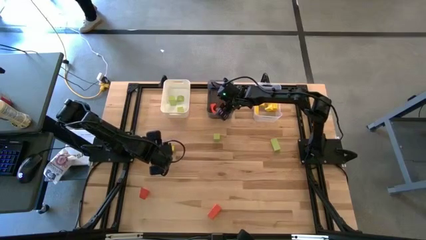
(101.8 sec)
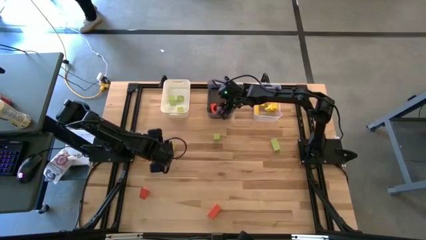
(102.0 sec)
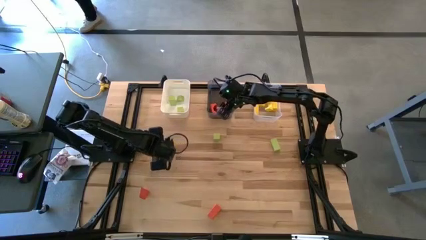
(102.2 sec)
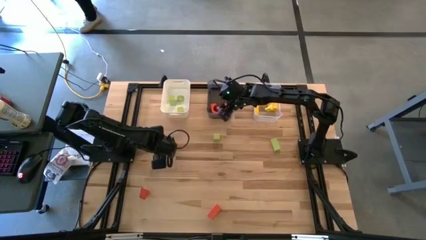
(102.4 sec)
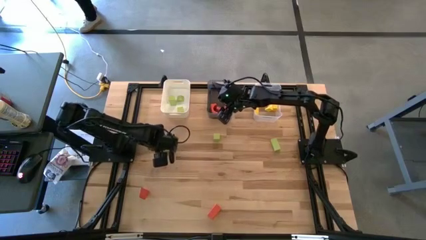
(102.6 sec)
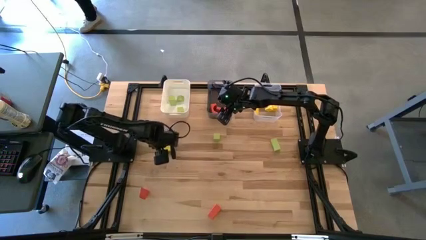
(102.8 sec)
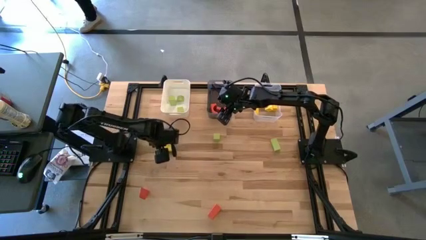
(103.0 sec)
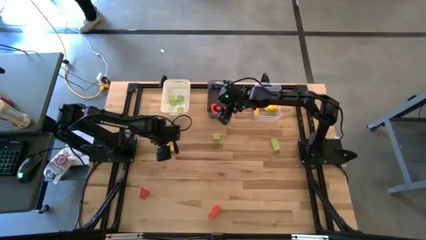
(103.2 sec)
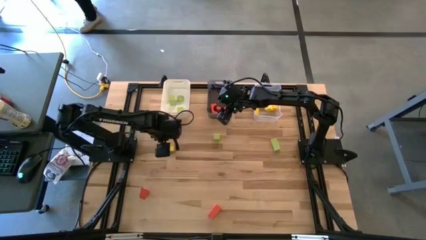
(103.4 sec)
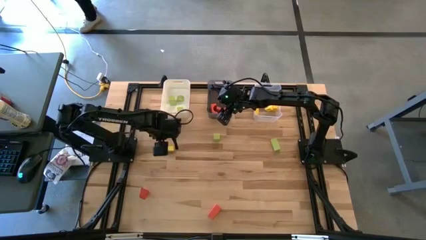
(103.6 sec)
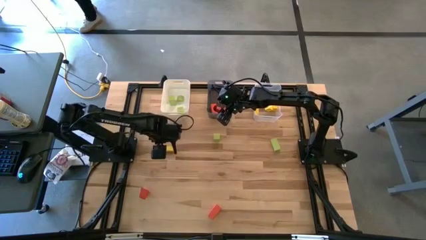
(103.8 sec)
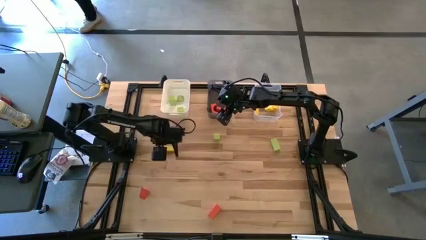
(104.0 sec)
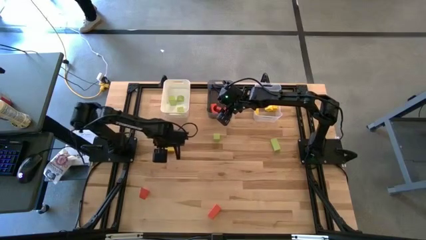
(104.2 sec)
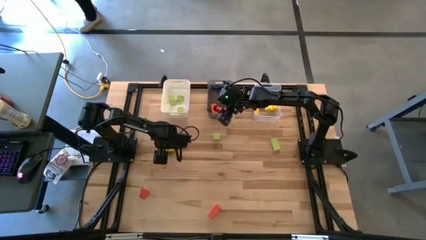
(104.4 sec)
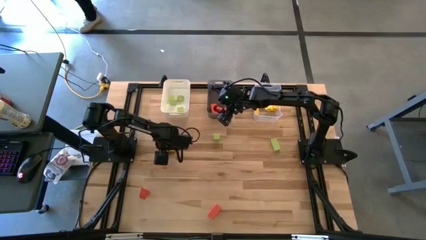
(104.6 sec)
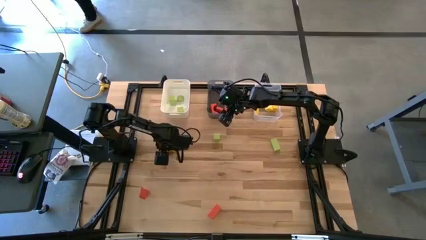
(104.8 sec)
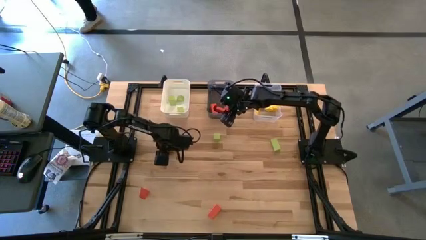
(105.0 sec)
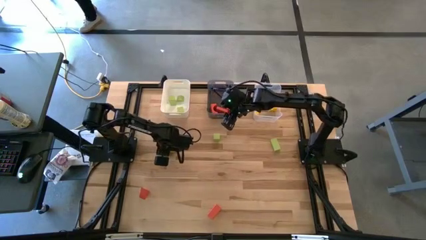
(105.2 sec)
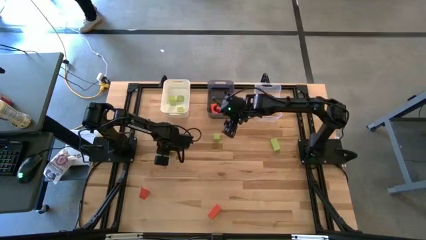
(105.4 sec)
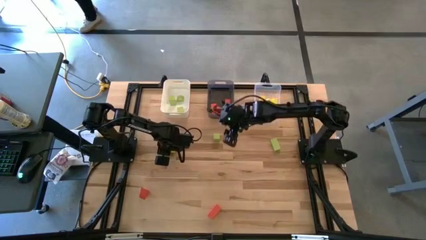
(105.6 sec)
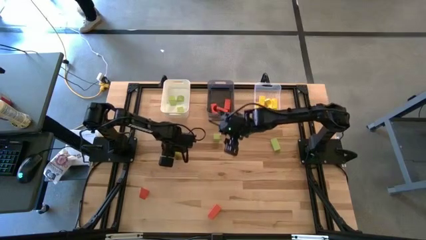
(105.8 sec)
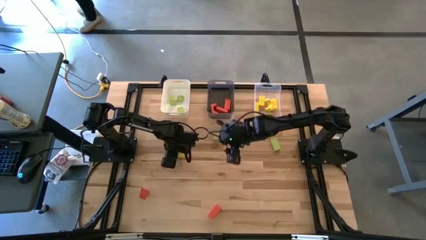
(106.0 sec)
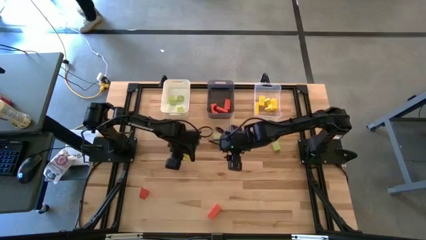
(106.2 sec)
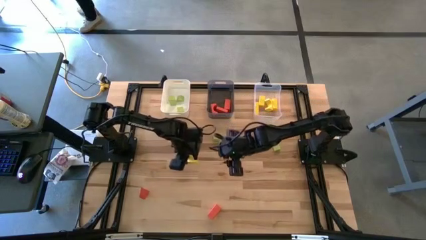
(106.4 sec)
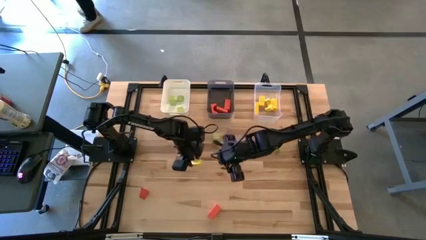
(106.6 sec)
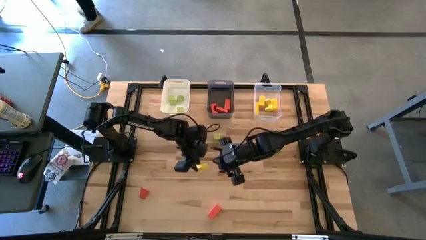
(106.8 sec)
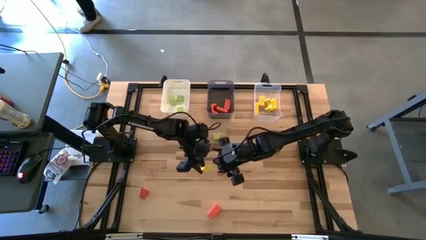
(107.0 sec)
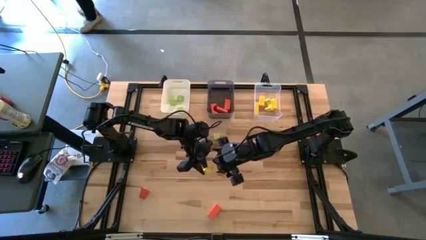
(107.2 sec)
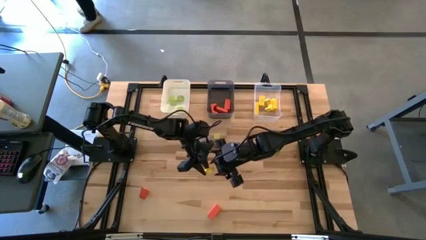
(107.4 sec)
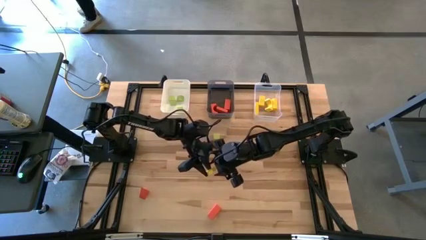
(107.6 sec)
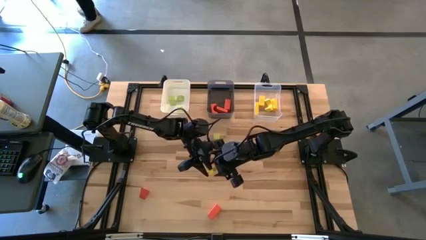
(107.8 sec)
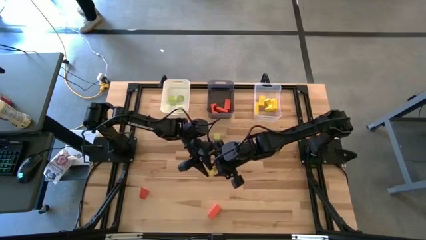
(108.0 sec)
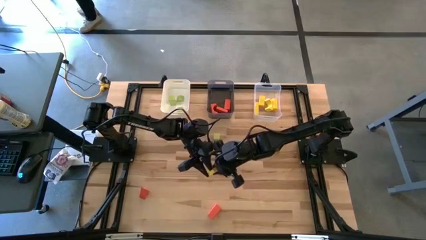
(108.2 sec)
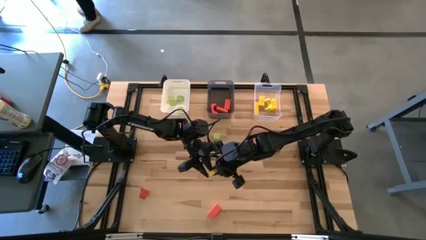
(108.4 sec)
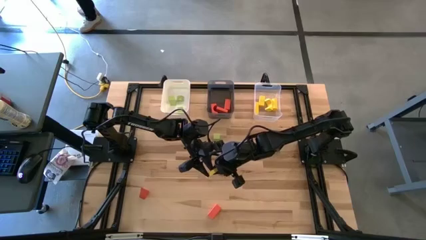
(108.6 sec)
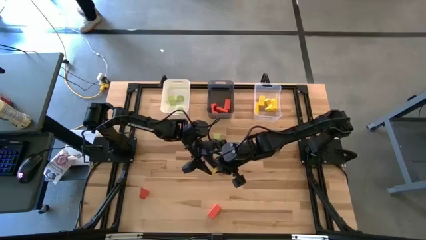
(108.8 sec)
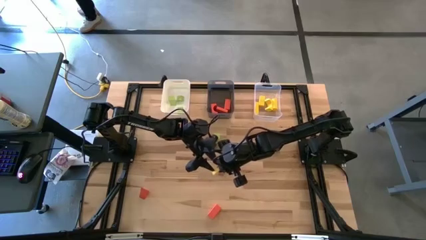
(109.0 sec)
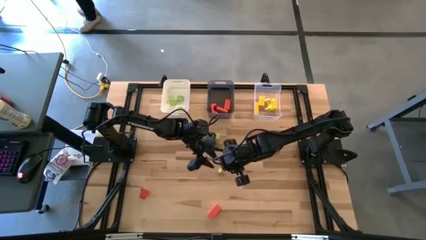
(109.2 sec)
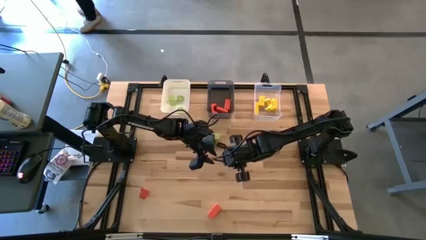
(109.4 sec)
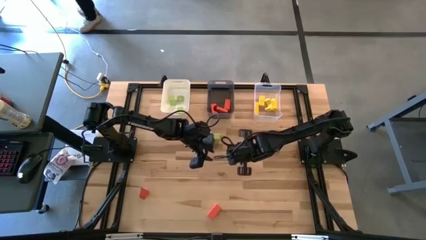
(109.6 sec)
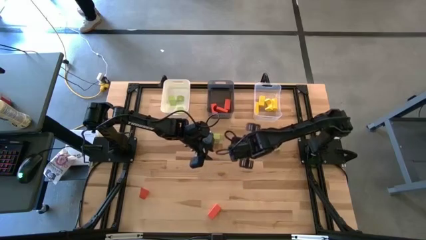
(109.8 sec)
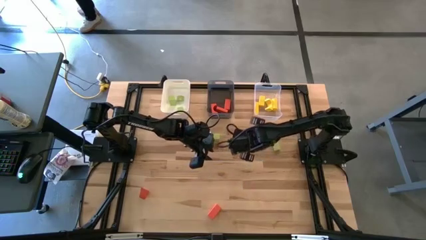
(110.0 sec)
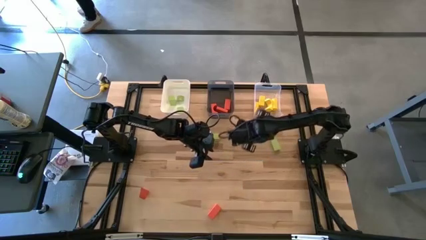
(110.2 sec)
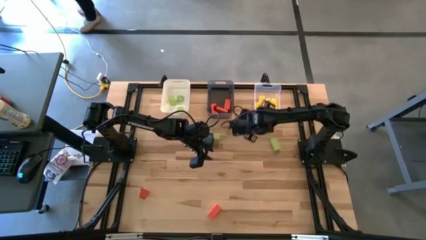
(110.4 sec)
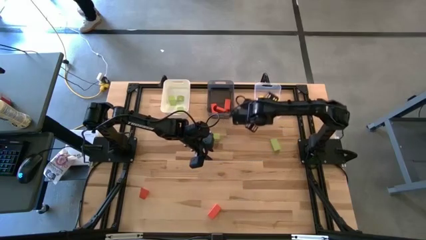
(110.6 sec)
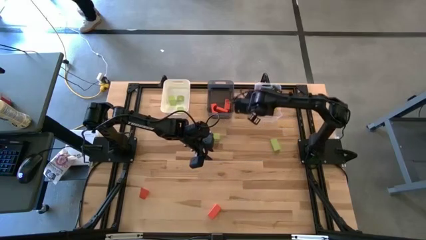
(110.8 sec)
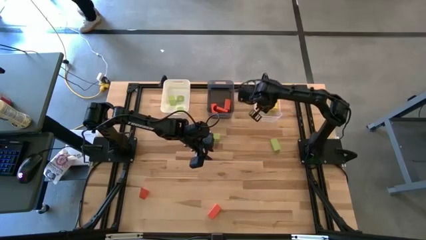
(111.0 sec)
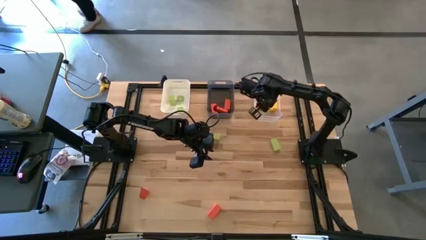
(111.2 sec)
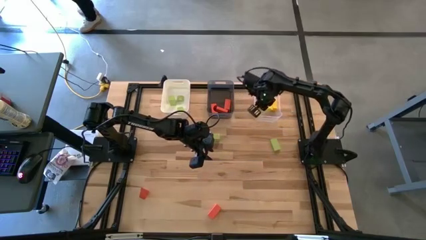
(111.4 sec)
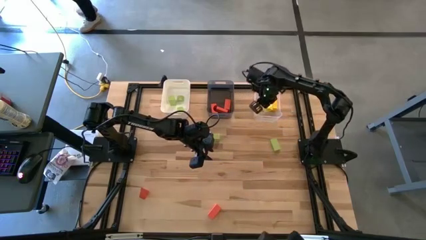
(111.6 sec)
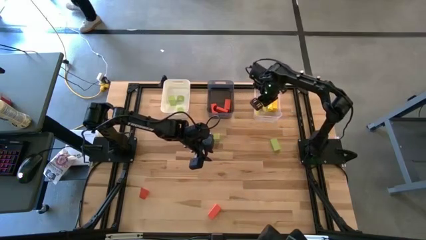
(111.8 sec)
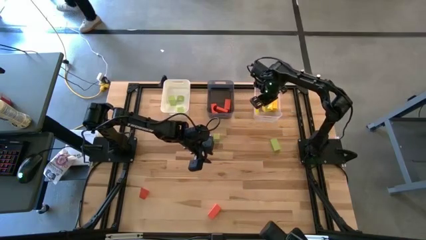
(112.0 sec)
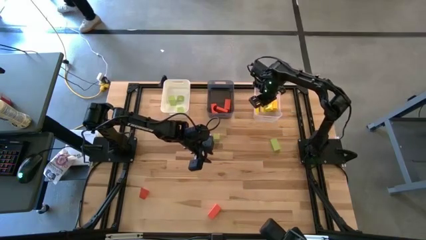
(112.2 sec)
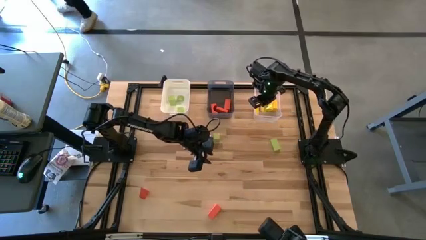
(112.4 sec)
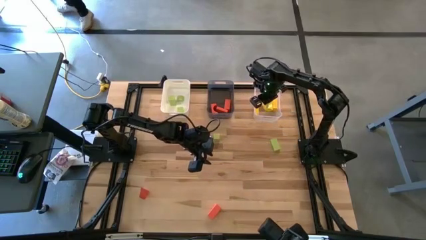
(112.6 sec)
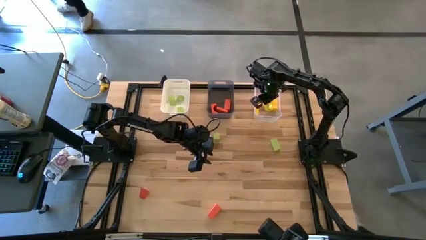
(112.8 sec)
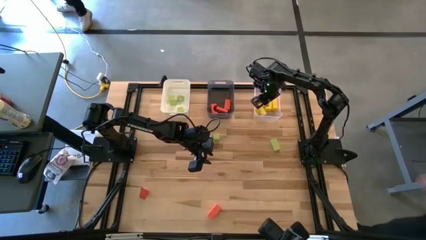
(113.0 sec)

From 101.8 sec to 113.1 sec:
Task: Sort & place blocks by color
Put the yellow block into the transparent bin

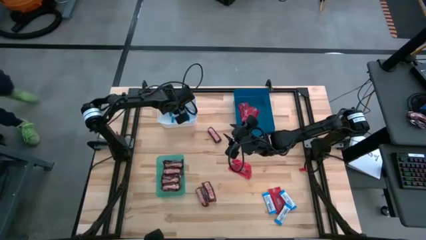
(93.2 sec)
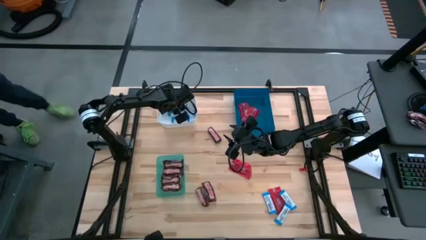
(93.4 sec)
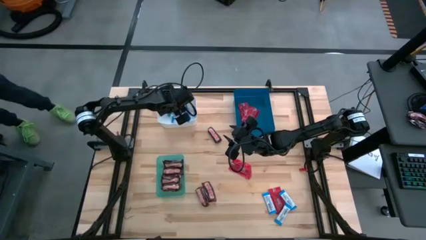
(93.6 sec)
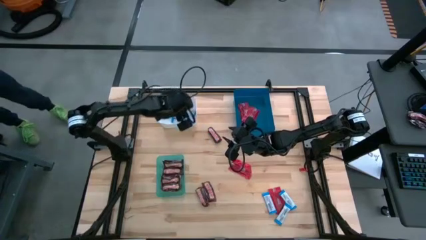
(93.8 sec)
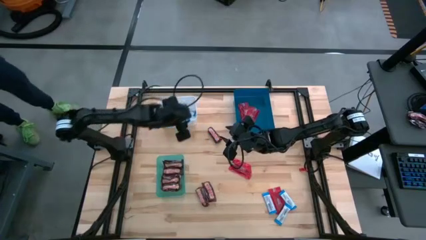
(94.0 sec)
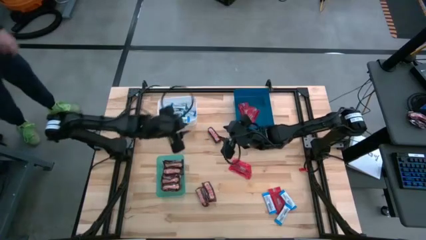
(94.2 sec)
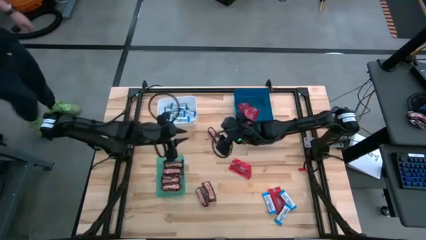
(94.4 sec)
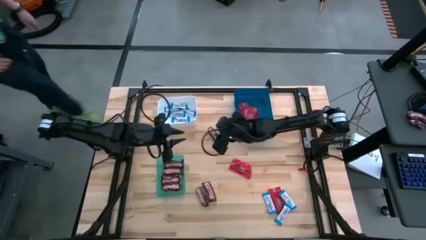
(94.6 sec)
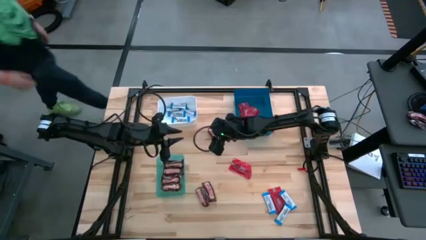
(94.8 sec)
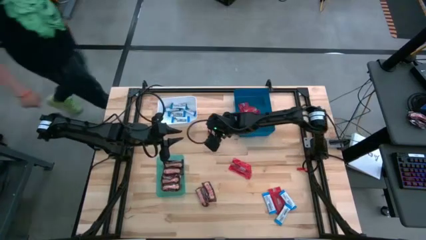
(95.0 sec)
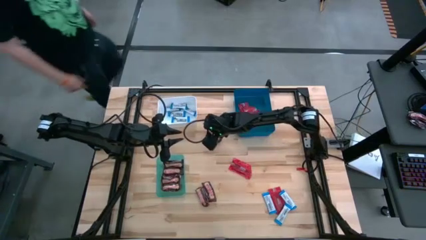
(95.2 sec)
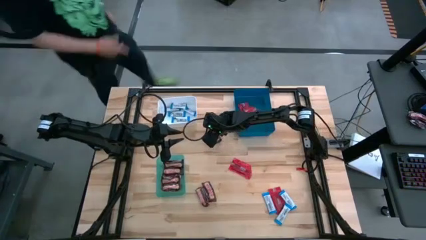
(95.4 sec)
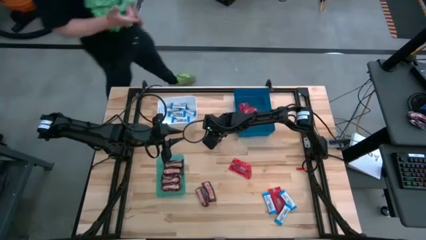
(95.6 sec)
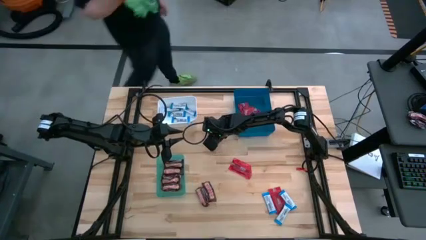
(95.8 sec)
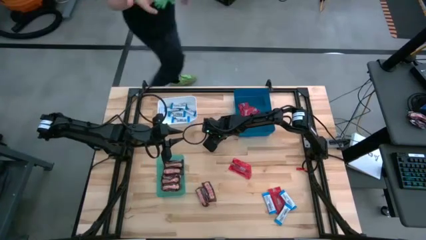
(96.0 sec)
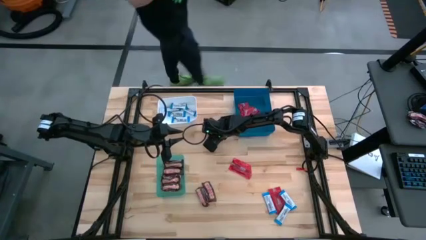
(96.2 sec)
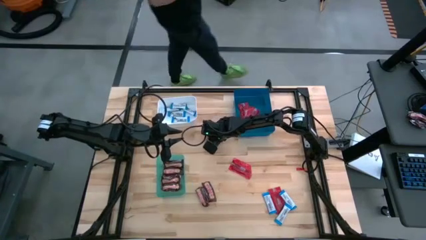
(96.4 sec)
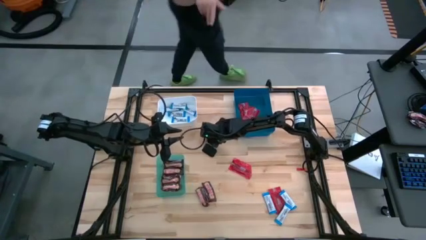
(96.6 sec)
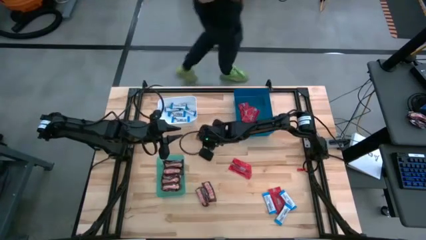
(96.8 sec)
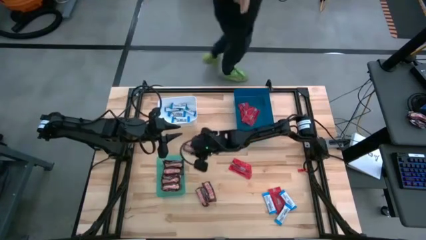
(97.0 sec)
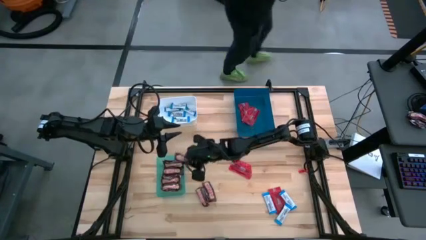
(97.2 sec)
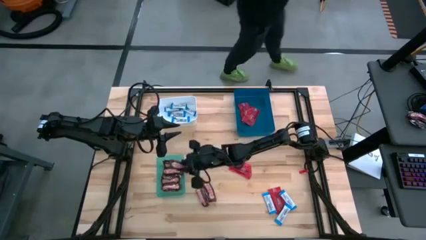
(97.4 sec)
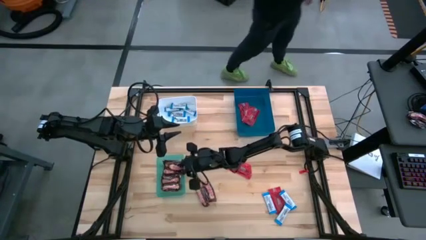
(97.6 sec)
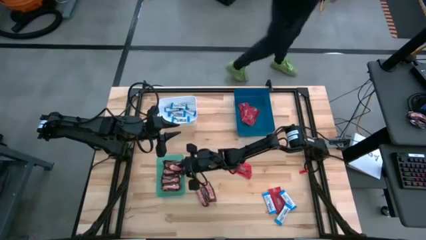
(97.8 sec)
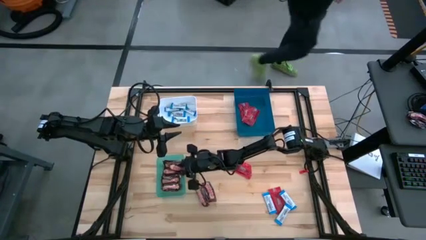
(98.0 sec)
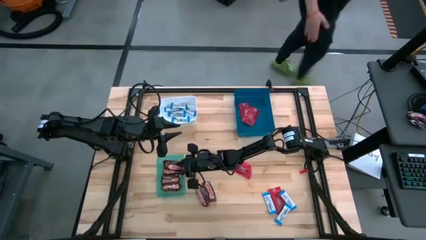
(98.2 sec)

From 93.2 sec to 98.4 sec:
Task: Sort candy
Put the brown chocolate bar into the green bin
